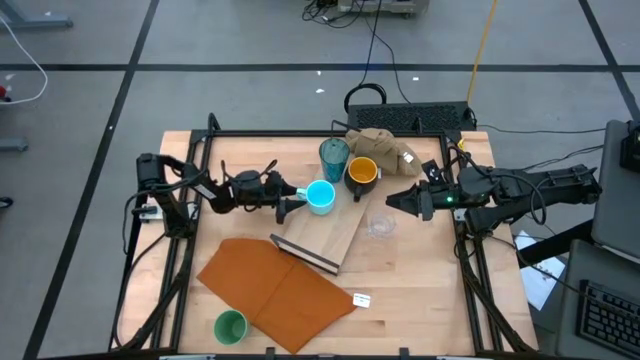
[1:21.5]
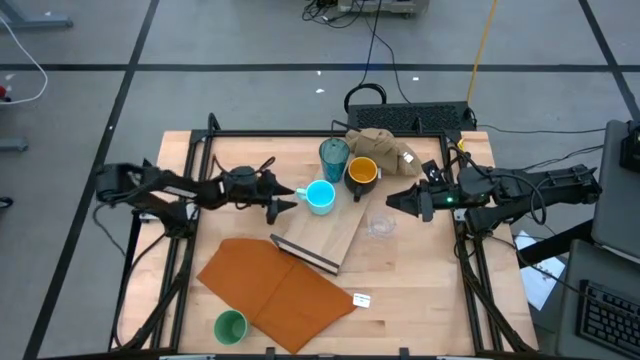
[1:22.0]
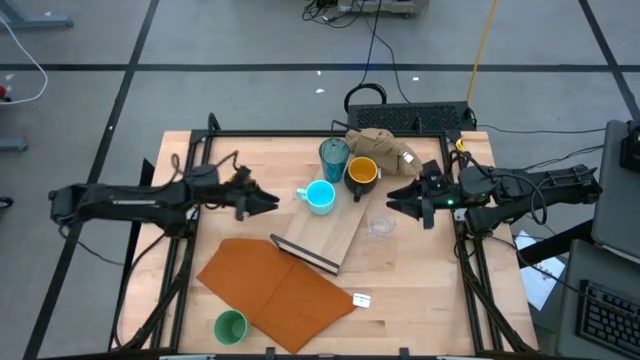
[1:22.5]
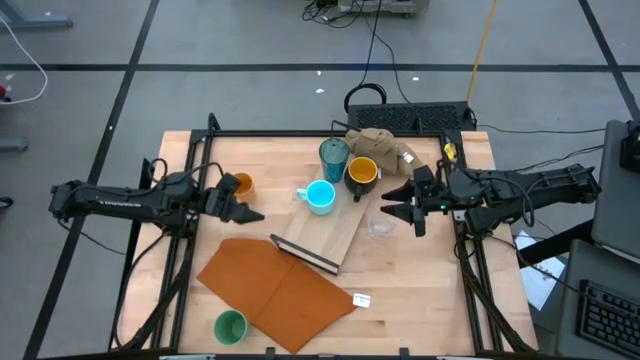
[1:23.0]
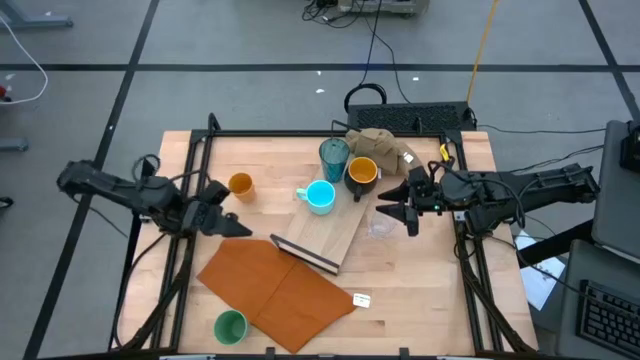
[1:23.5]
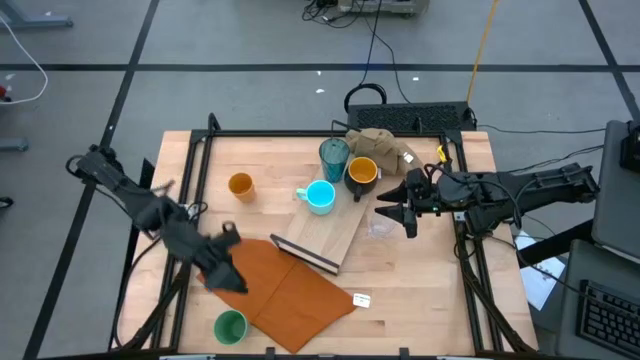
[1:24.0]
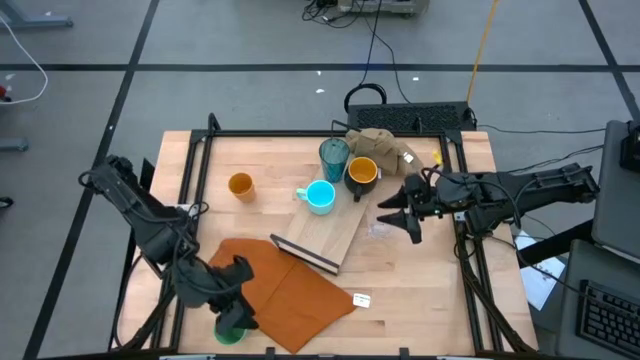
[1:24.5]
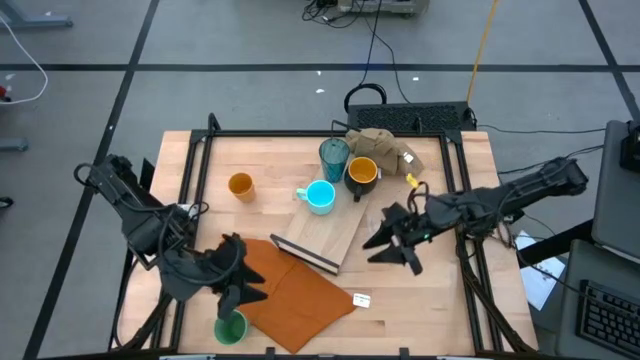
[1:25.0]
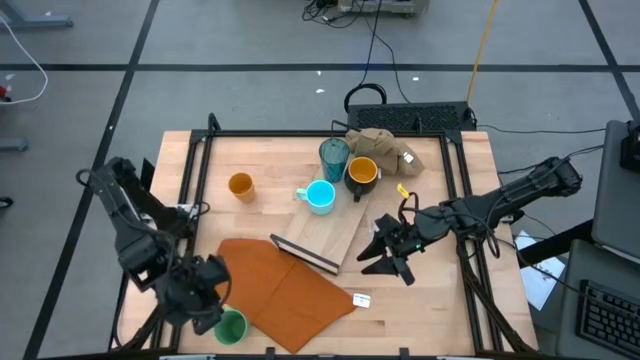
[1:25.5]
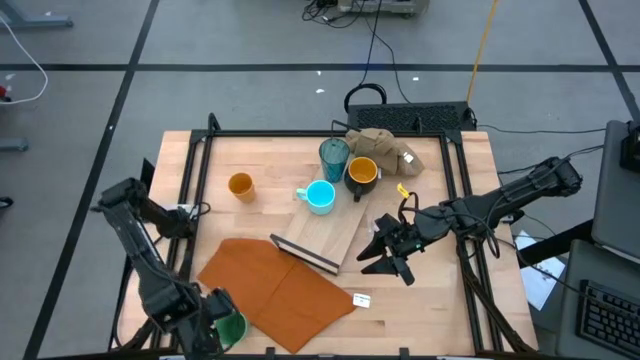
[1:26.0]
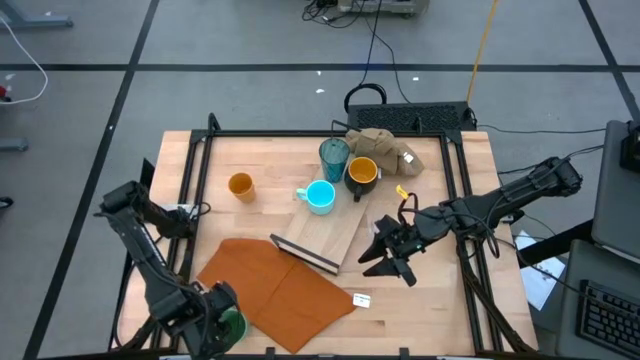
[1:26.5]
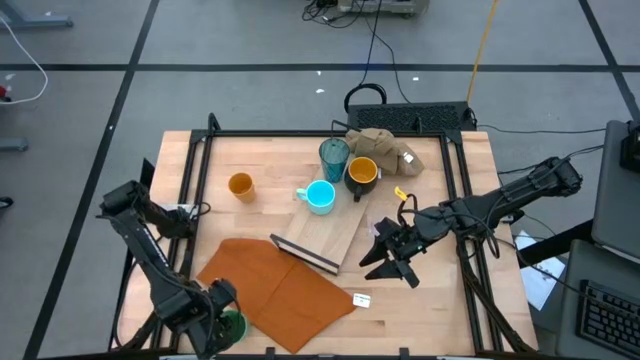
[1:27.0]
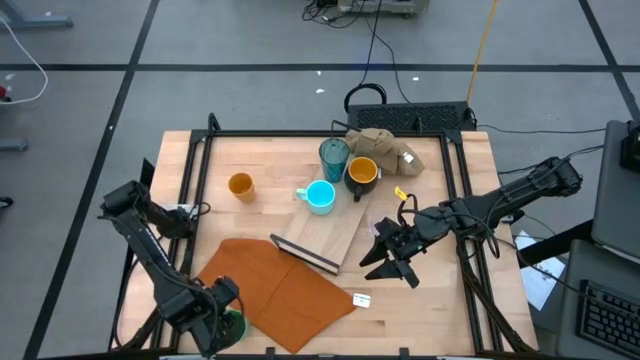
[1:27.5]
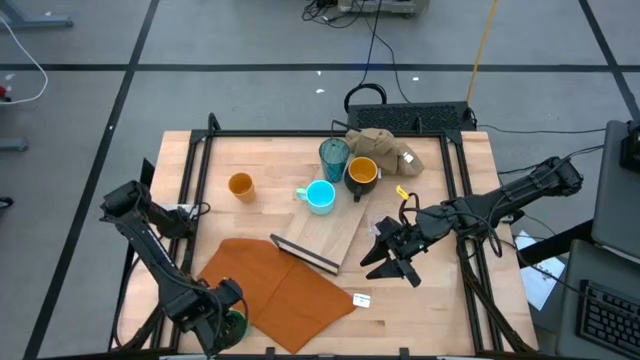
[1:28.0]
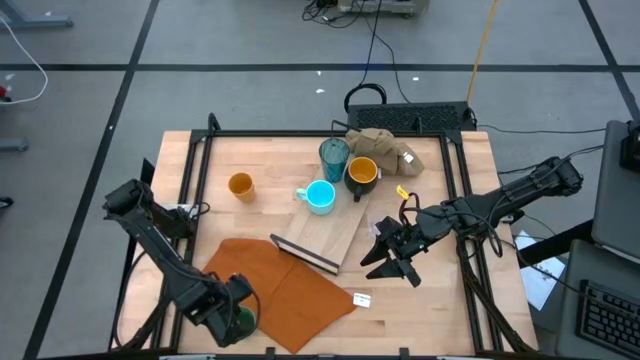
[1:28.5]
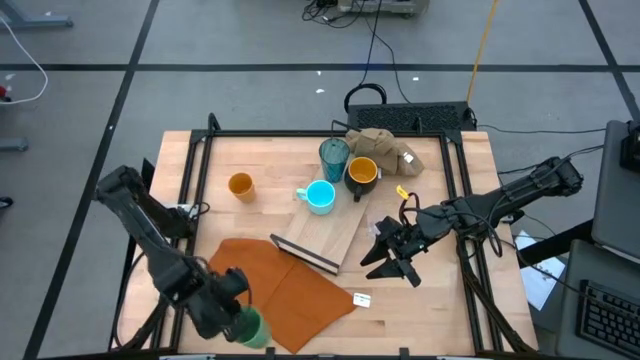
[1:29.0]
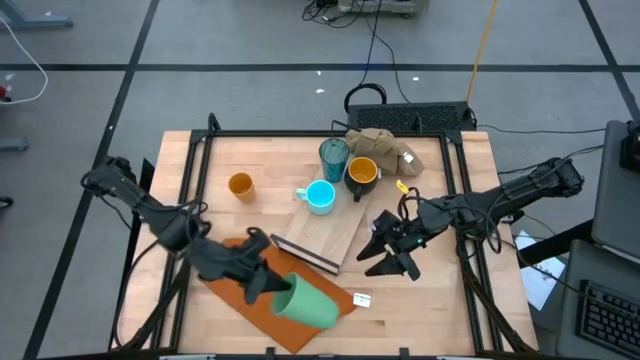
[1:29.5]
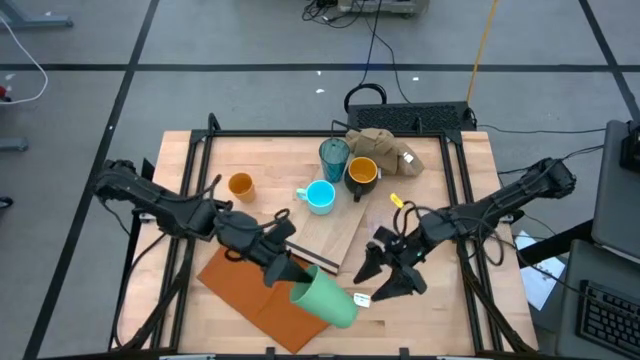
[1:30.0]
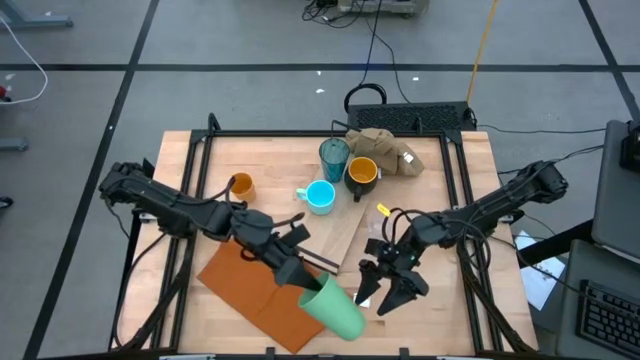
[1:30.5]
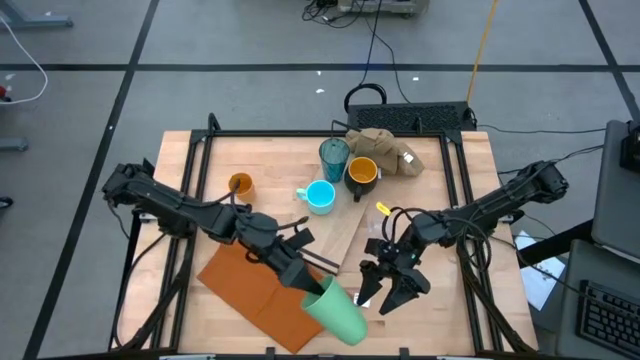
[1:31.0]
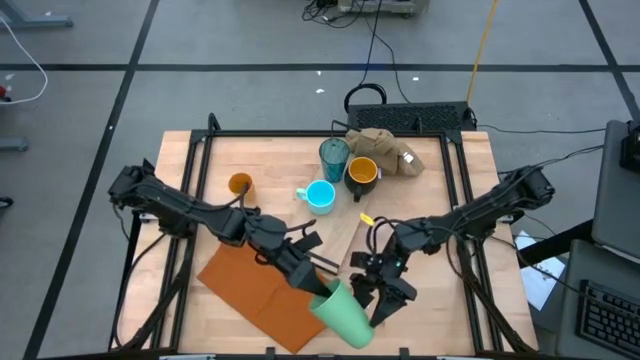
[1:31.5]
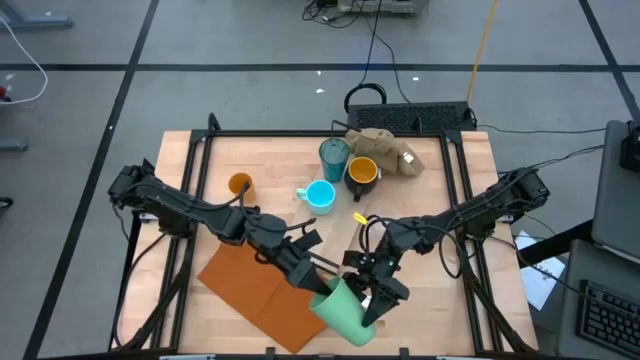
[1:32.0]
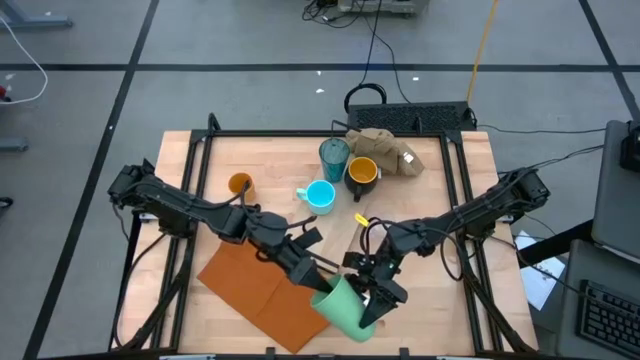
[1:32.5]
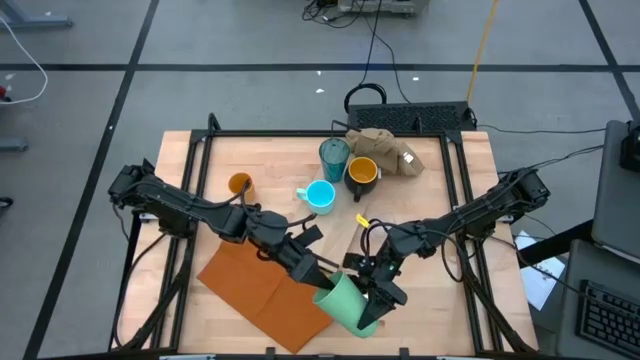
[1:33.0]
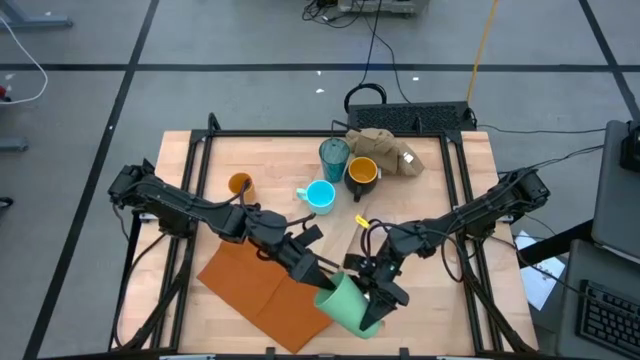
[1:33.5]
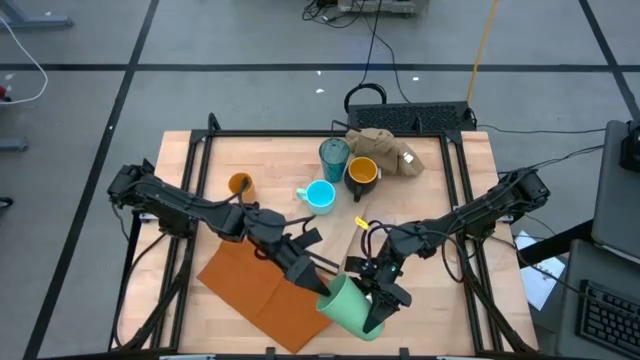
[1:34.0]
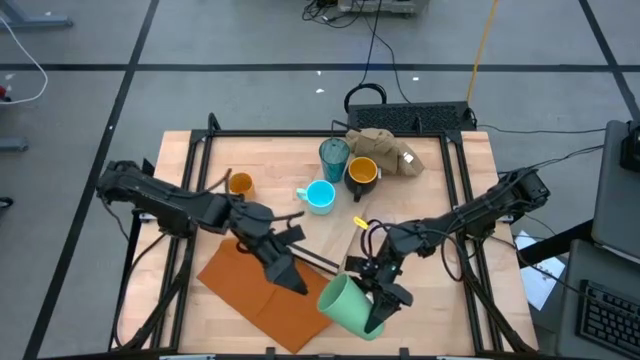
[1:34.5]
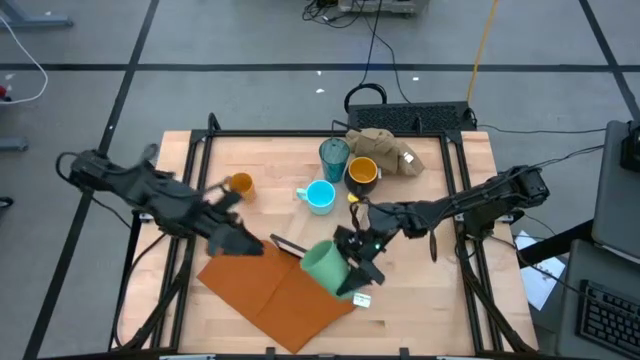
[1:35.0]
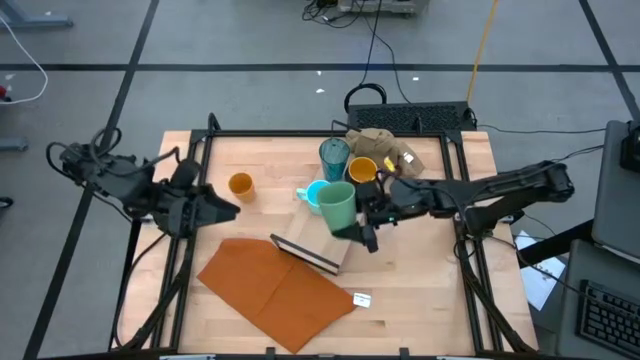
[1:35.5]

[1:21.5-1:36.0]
Task: Stack small to large cups/mugs on shelf
Put the light green cup on the shelf

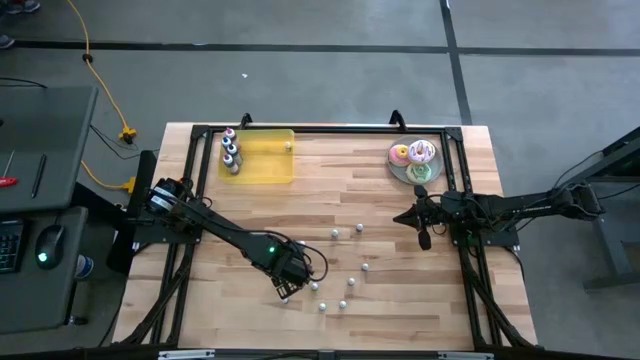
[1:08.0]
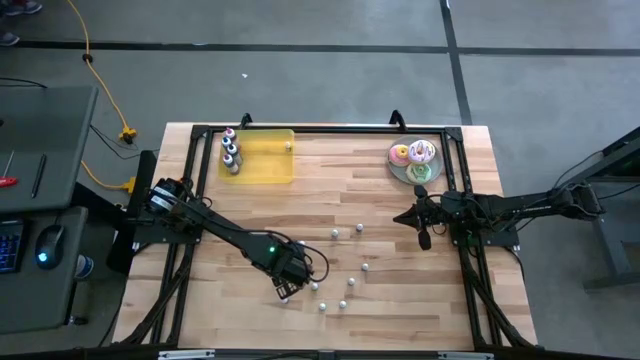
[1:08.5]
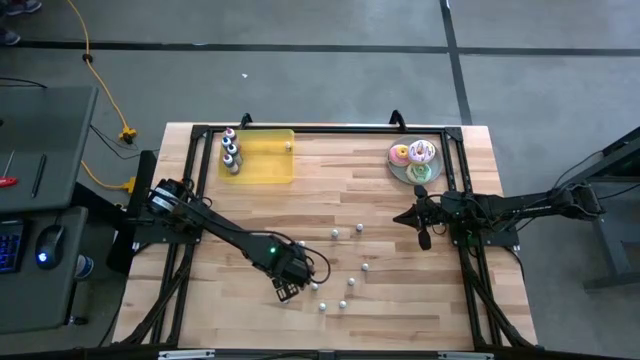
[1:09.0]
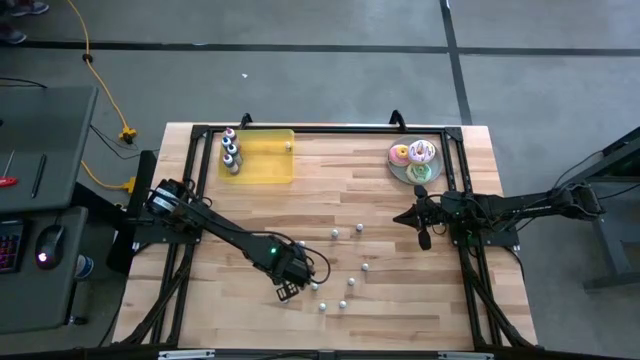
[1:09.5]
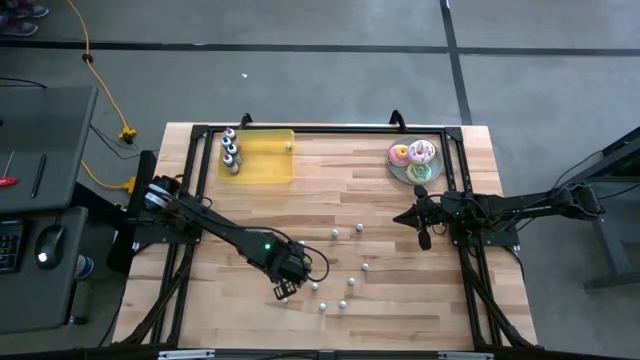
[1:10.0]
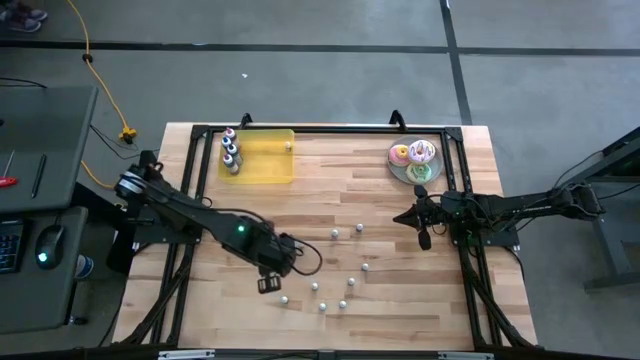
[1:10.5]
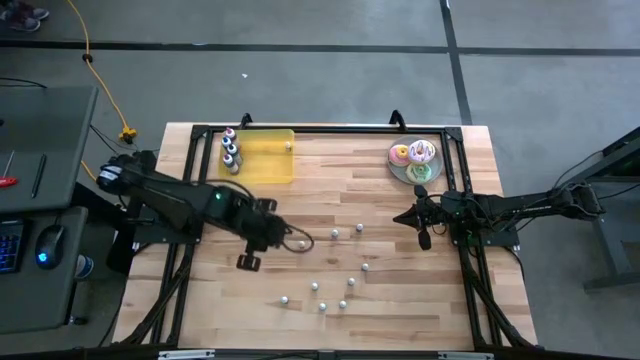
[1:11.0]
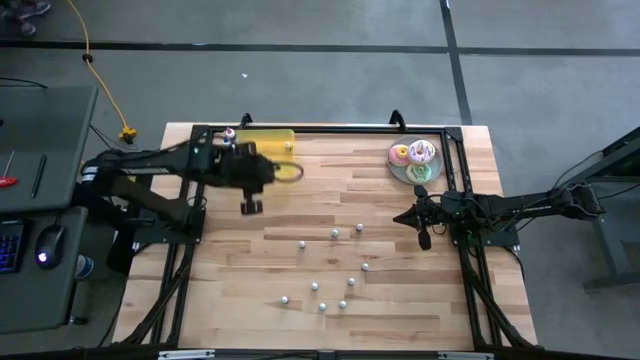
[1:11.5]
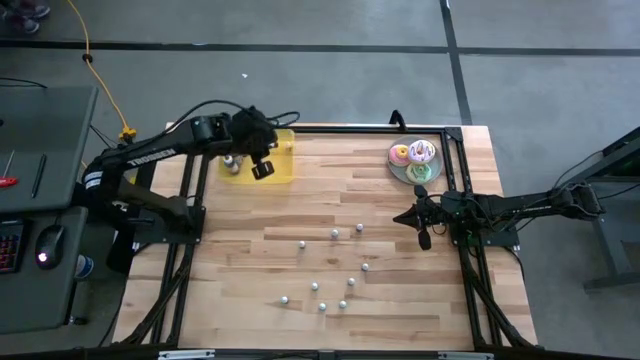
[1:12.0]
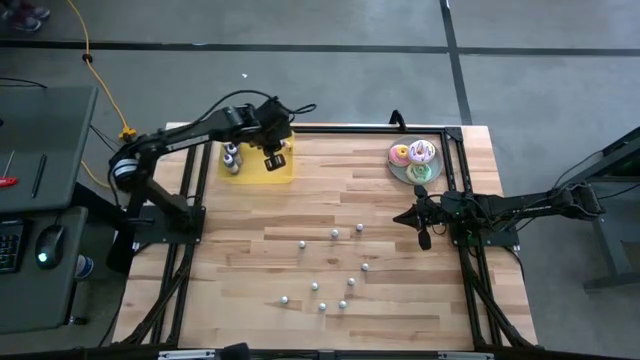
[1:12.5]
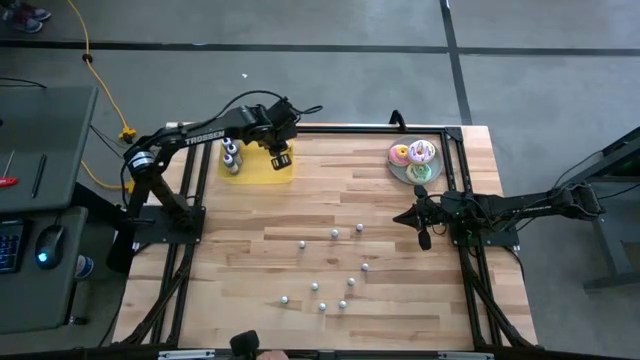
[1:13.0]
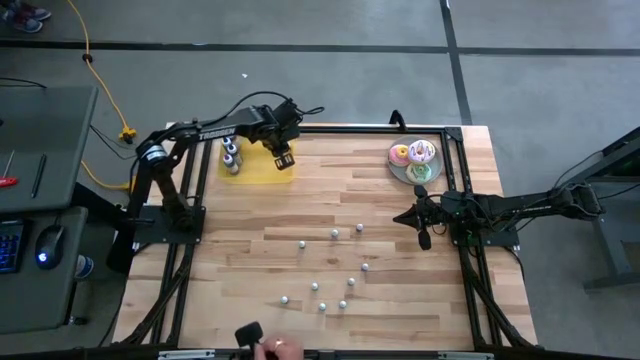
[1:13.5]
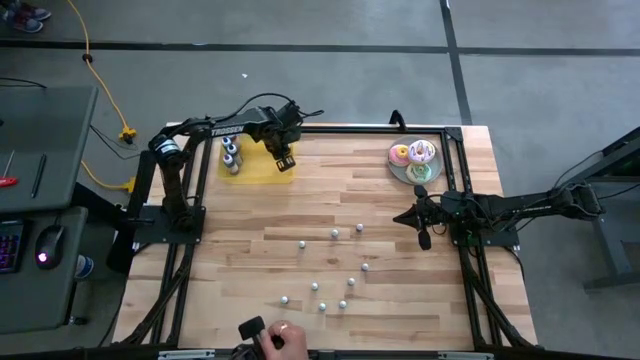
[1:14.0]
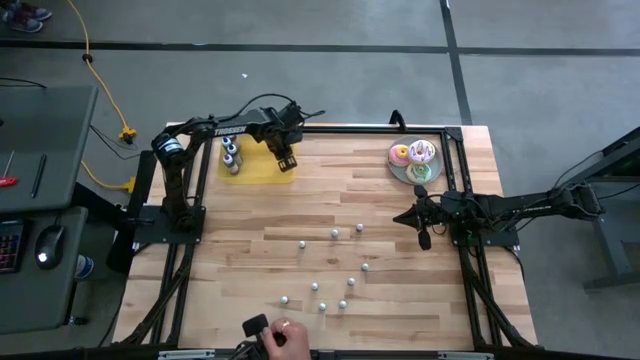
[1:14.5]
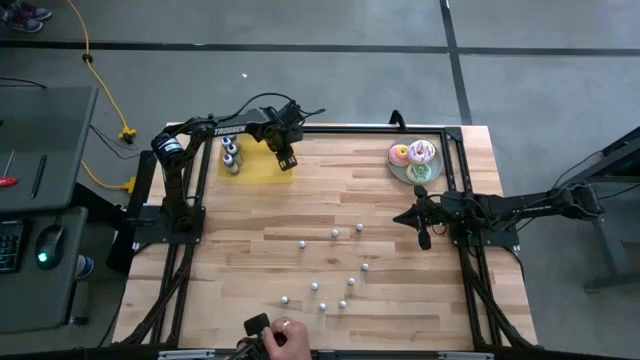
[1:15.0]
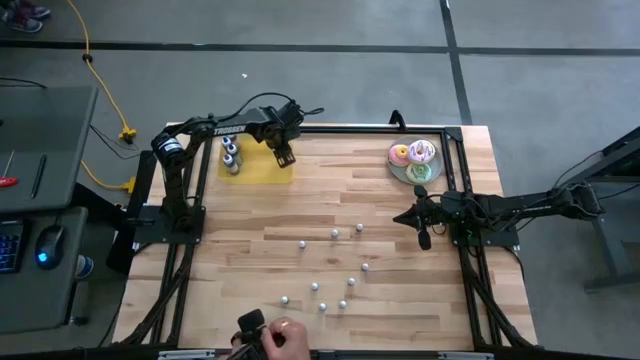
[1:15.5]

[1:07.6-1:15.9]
Task: Pick & Place food coloring
Put the small red food coloring bottle into the yellow bin
